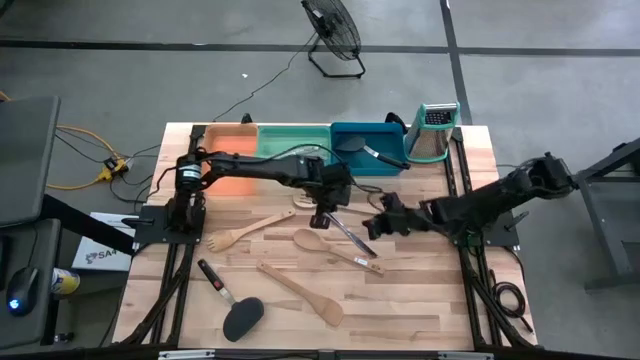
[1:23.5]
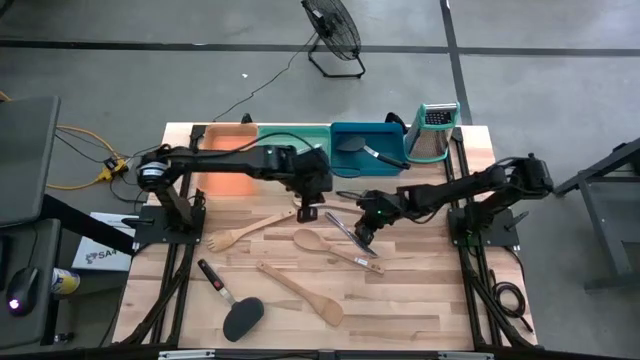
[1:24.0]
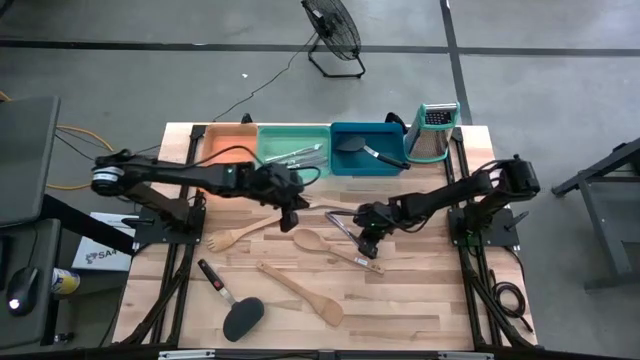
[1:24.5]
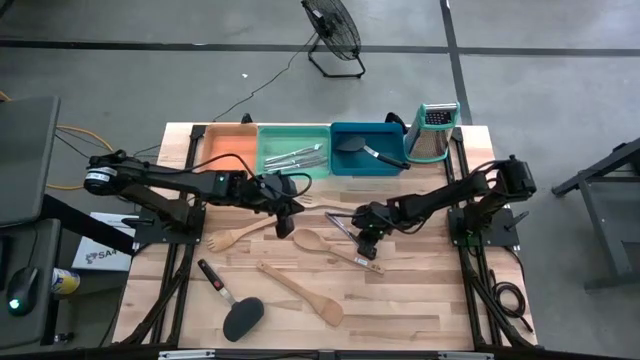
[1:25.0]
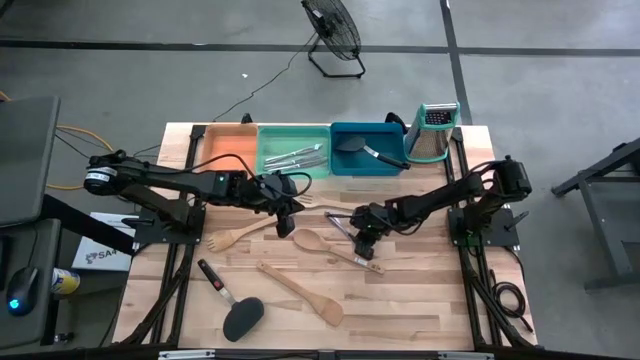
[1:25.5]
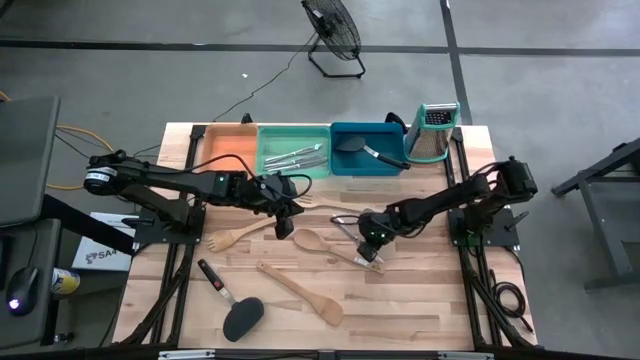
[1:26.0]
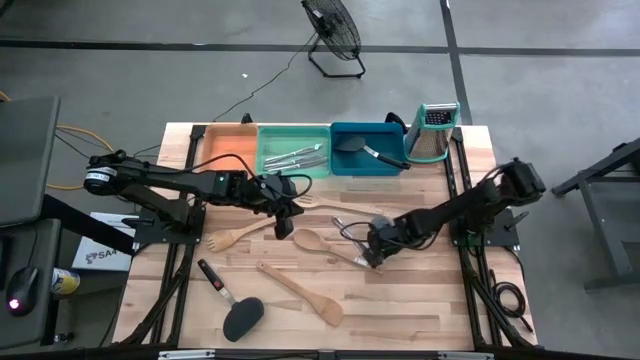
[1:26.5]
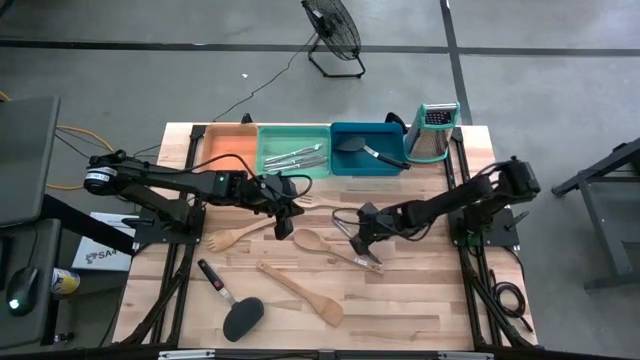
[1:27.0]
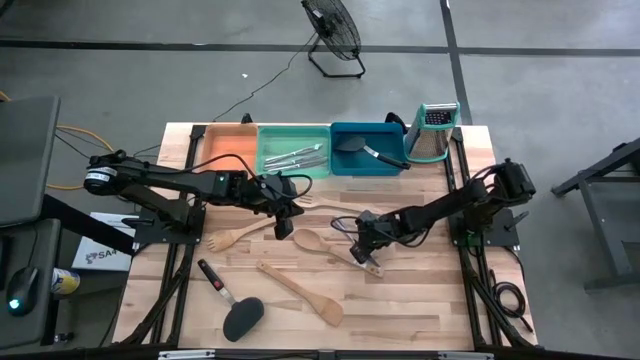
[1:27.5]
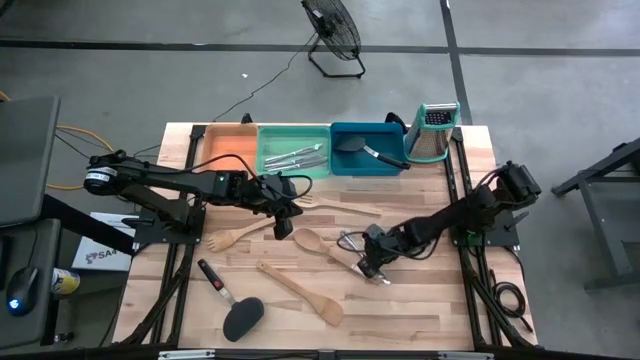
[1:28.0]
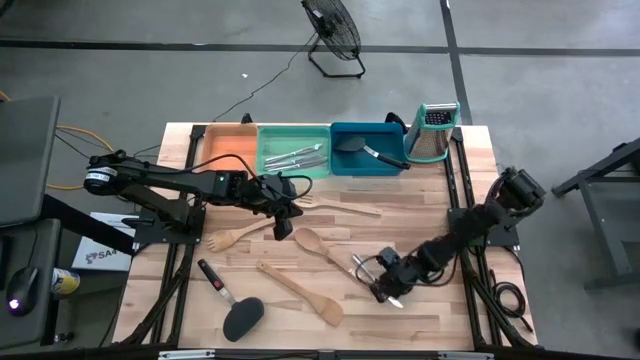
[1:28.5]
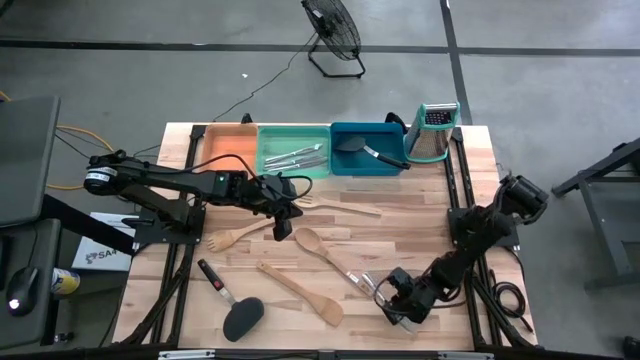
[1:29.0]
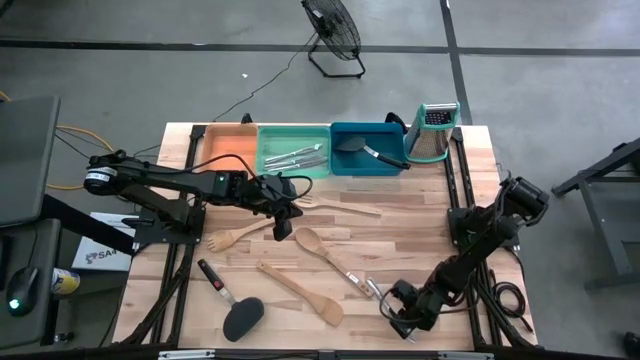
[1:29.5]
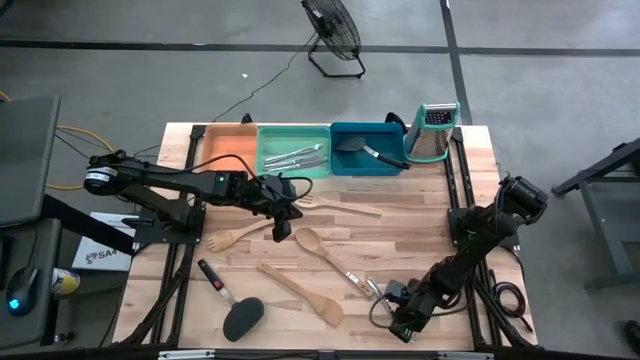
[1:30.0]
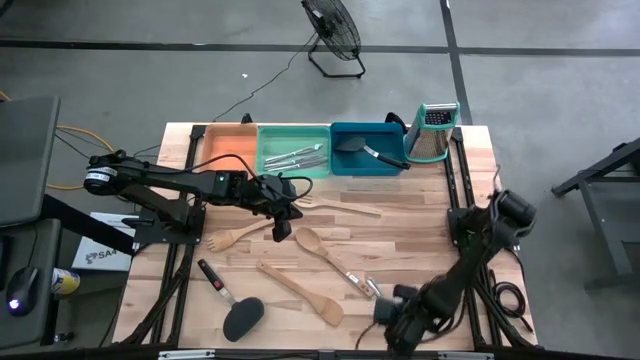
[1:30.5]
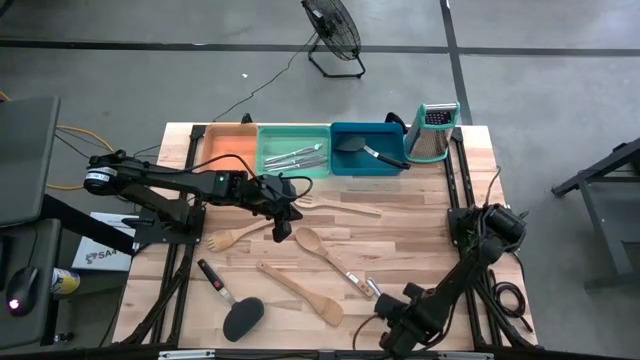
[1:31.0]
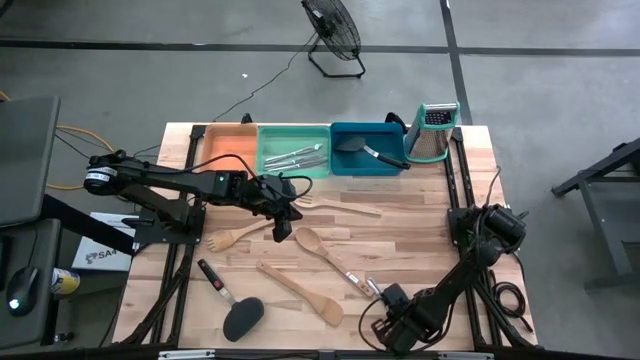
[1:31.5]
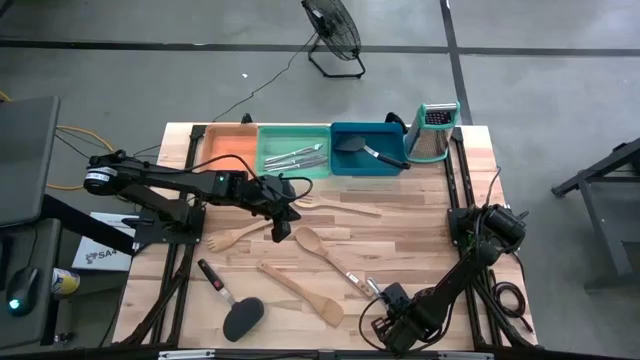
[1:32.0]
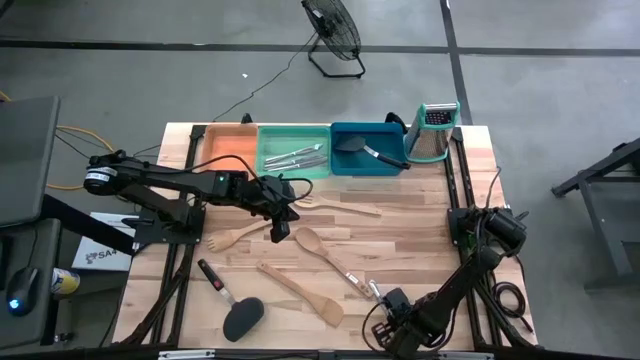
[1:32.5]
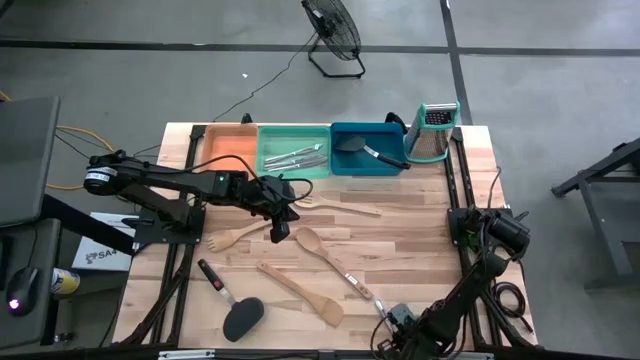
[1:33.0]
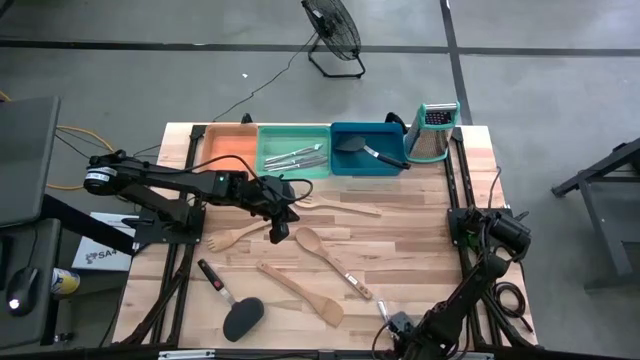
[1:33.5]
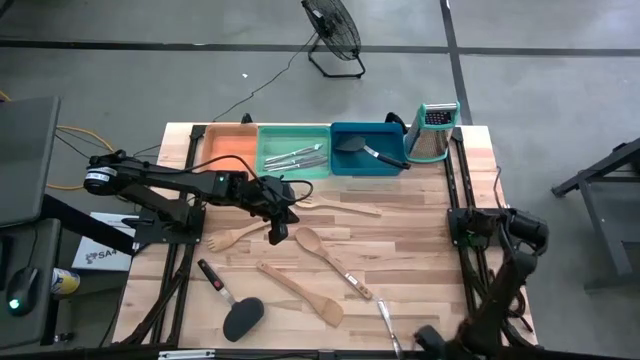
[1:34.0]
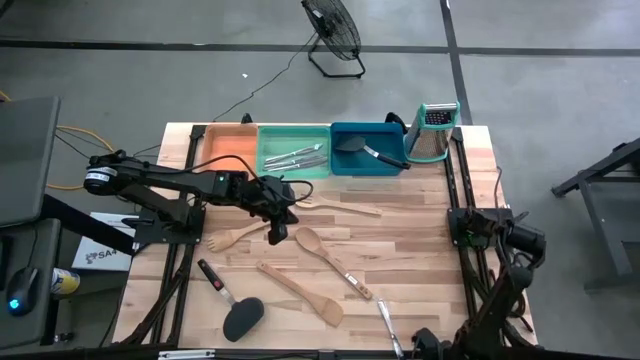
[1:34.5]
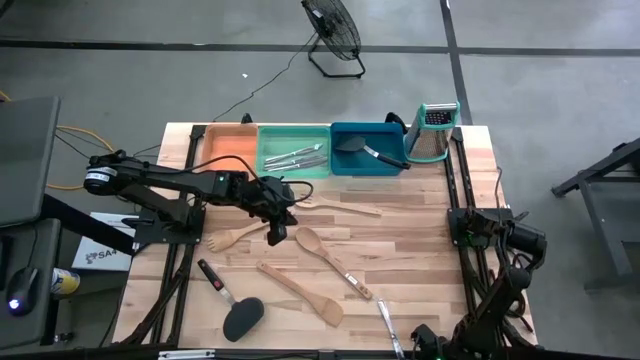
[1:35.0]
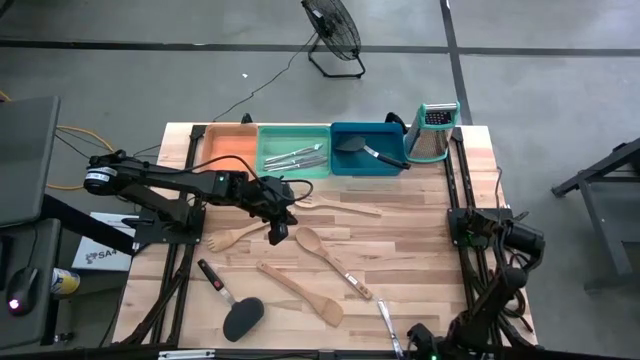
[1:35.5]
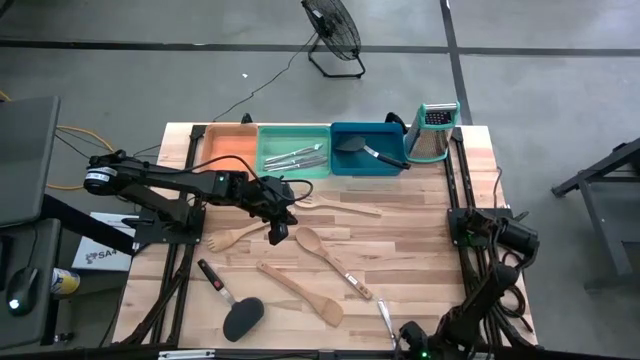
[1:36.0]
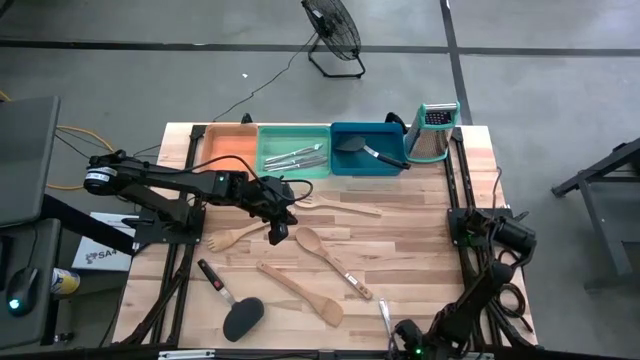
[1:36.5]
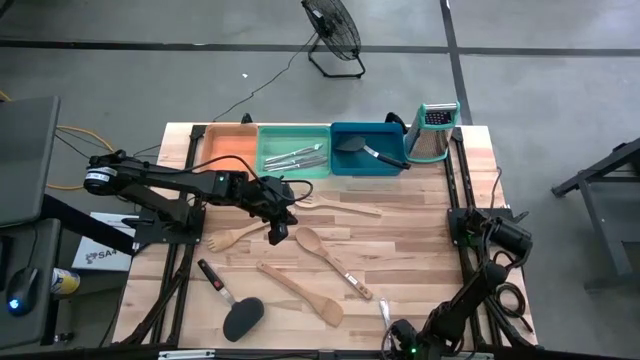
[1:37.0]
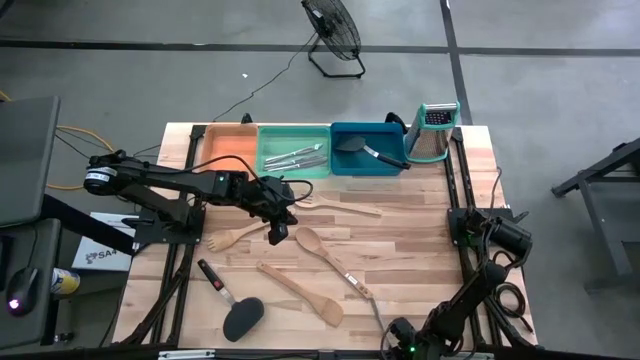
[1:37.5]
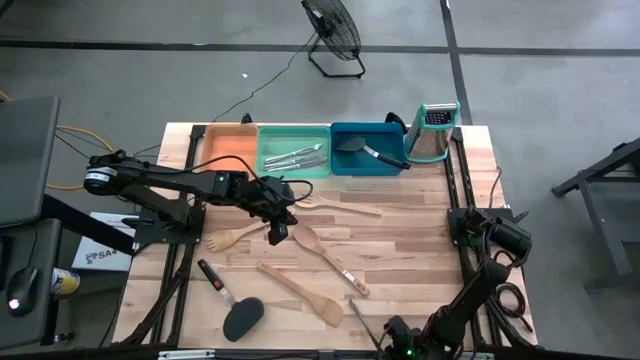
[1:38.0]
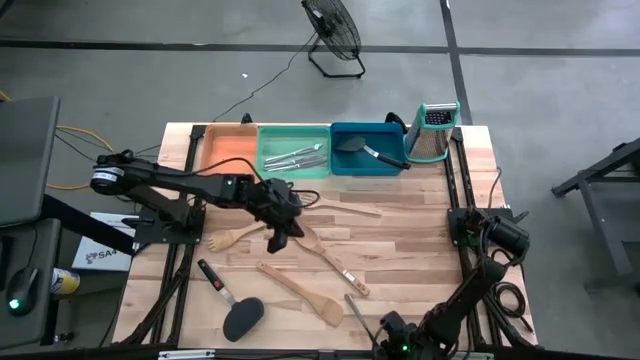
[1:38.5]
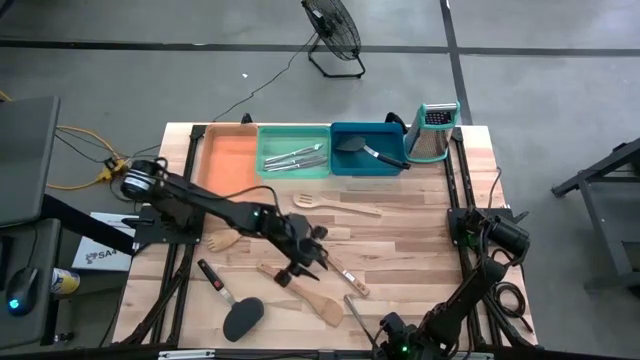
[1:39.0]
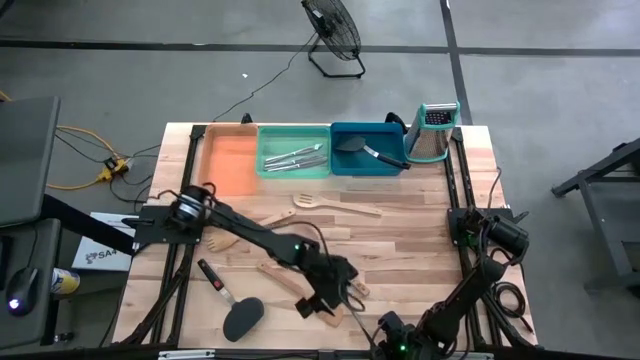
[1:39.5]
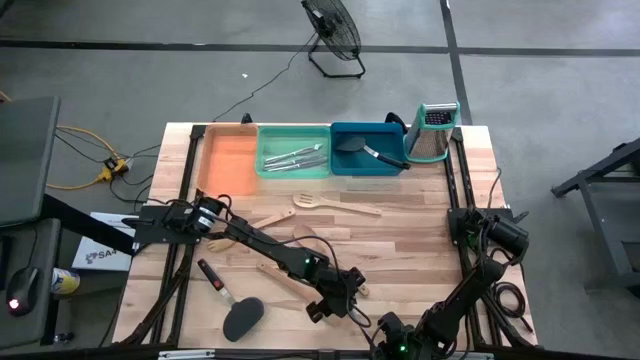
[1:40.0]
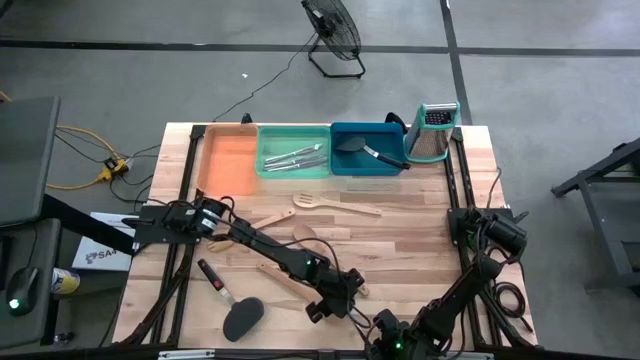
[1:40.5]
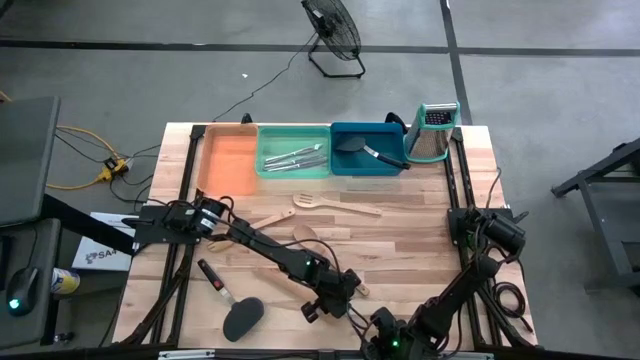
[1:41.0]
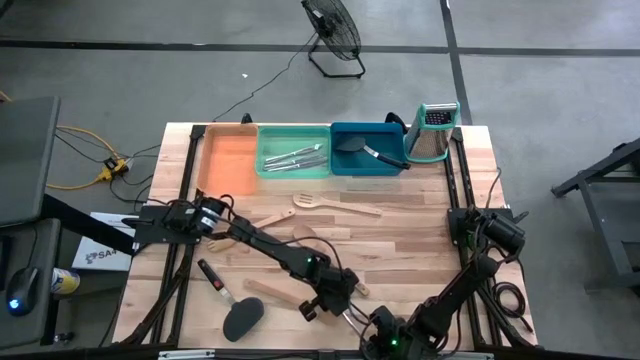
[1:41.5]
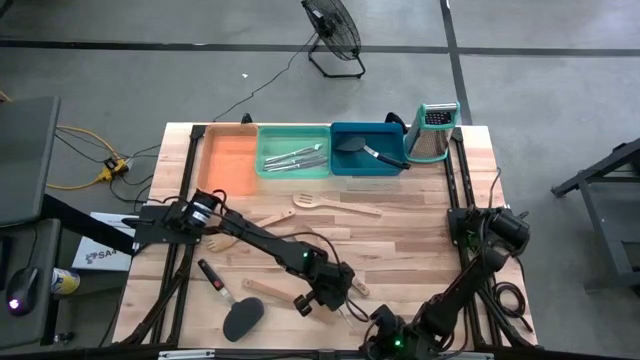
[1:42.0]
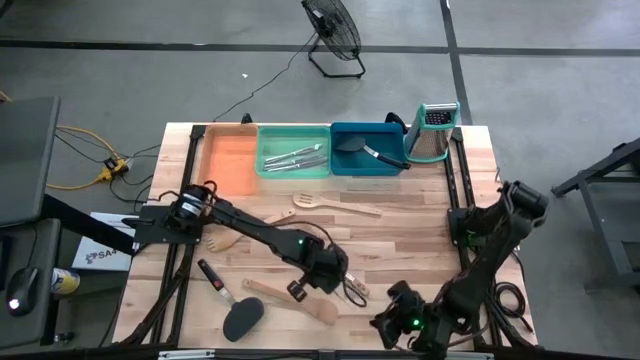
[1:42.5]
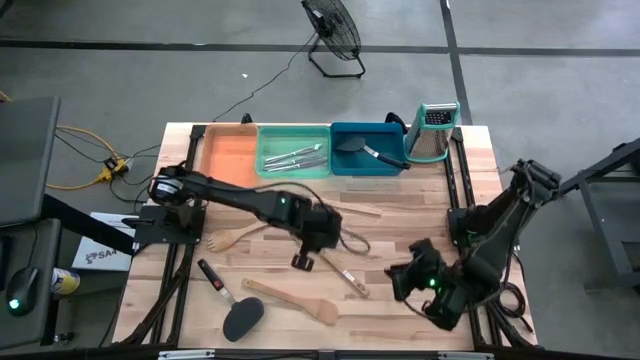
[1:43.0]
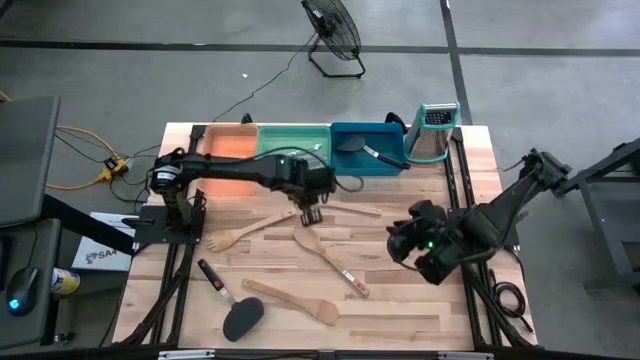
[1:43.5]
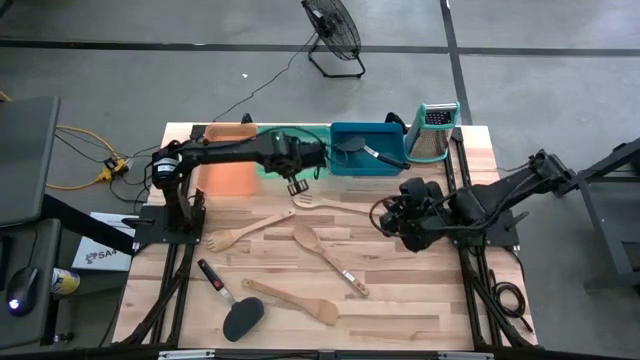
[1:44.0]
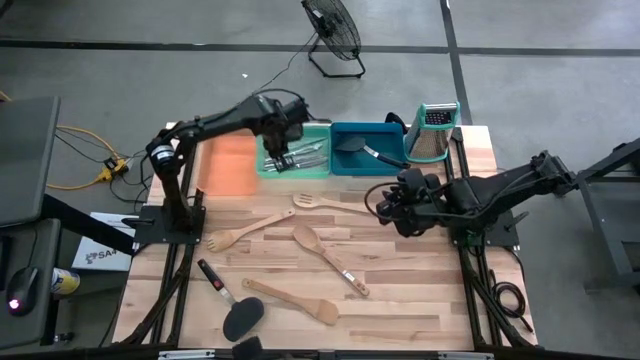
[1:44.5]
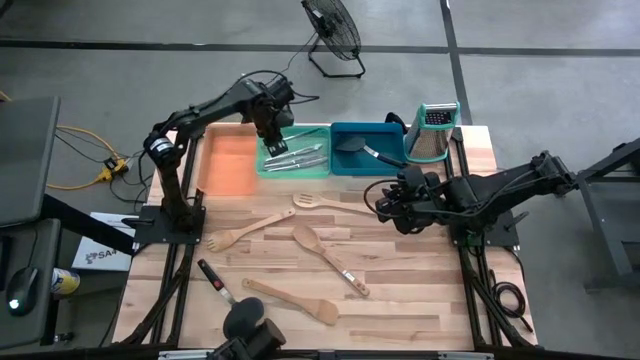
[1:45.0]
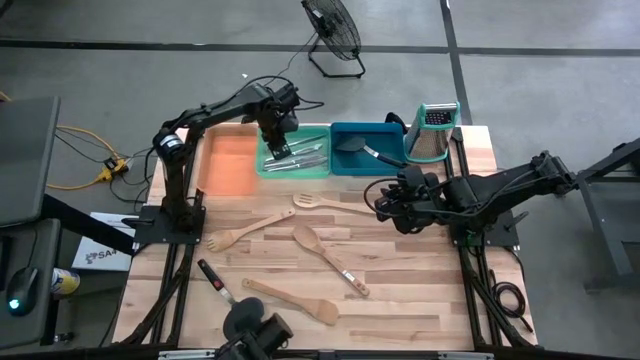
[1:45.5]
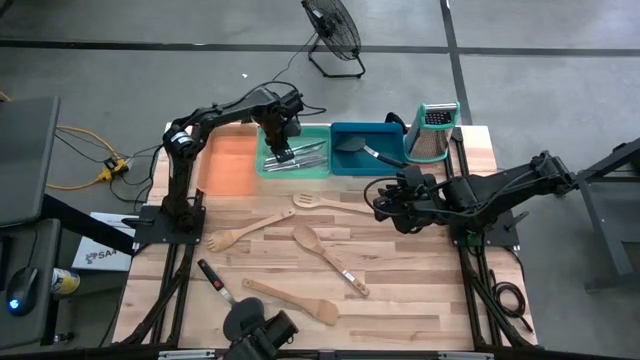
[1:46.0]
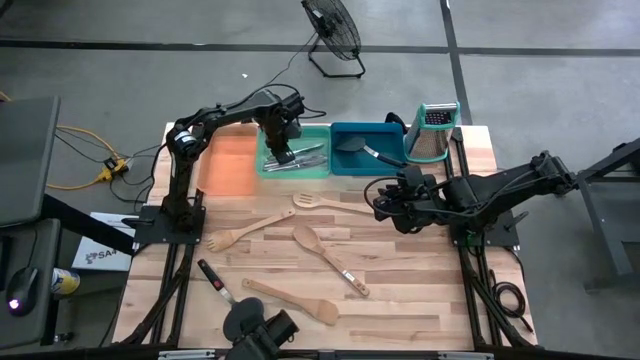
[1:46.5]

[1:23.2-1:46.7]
Task: Pick & Place Kitchen Items
Put the silver table knife into the green bin
